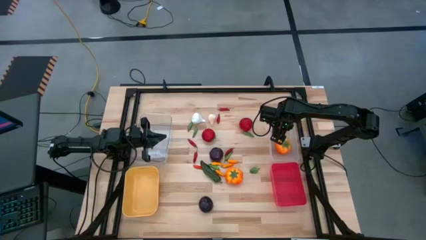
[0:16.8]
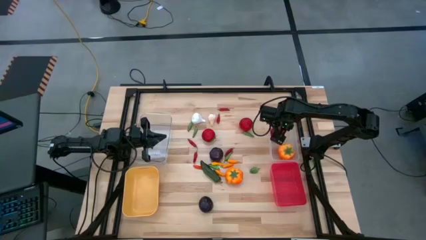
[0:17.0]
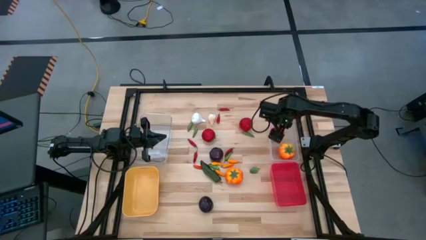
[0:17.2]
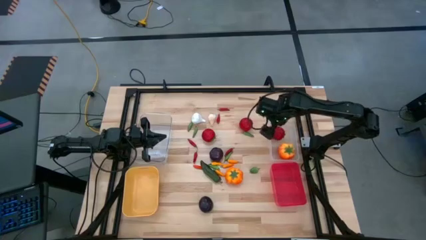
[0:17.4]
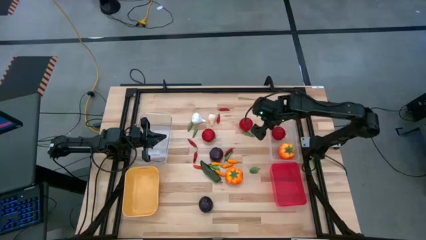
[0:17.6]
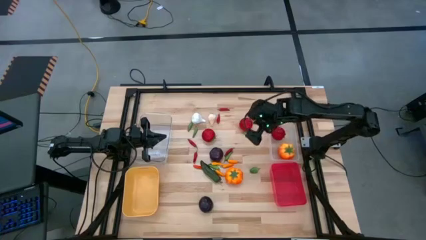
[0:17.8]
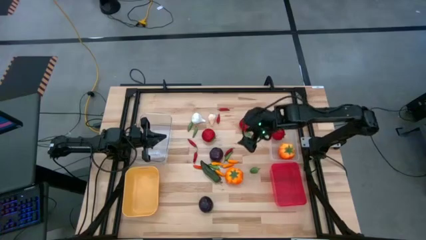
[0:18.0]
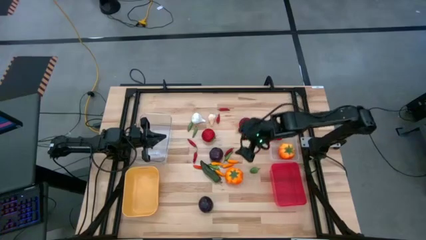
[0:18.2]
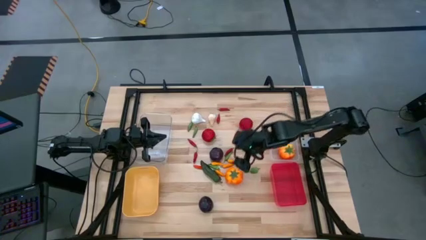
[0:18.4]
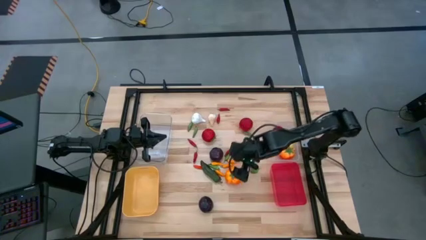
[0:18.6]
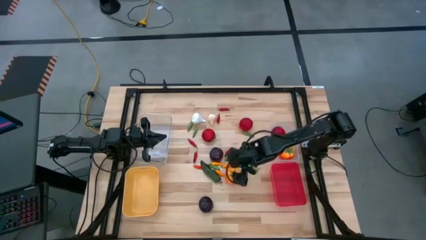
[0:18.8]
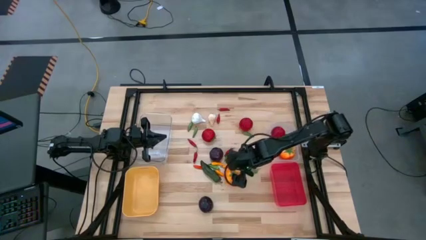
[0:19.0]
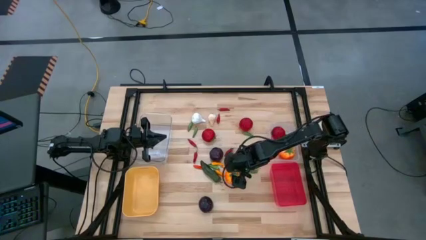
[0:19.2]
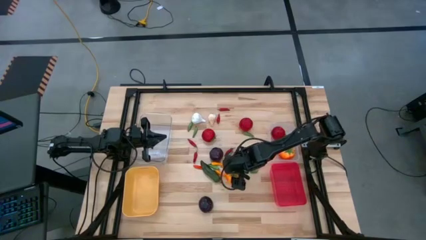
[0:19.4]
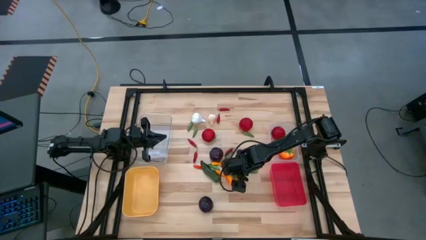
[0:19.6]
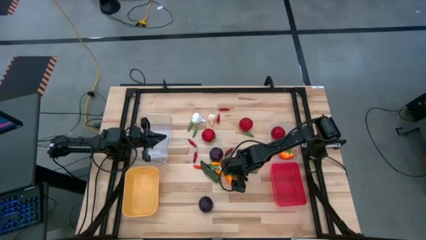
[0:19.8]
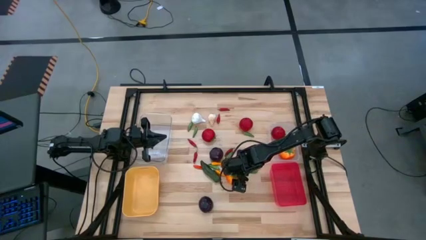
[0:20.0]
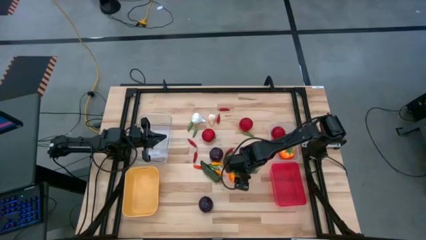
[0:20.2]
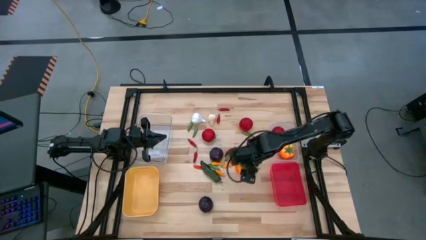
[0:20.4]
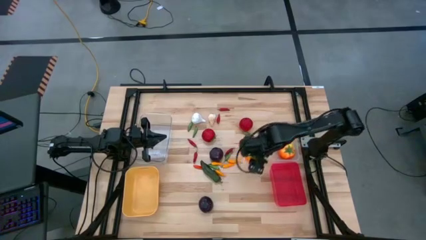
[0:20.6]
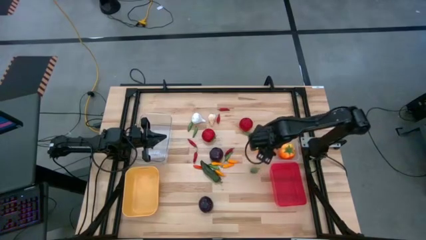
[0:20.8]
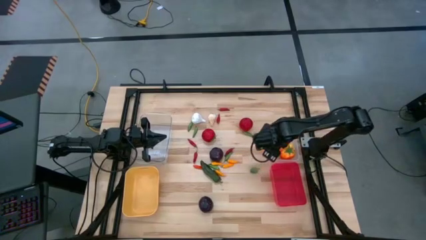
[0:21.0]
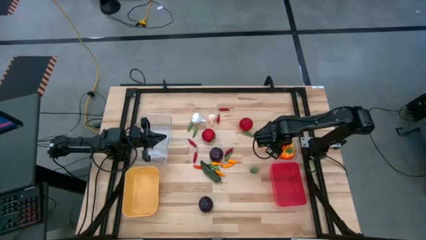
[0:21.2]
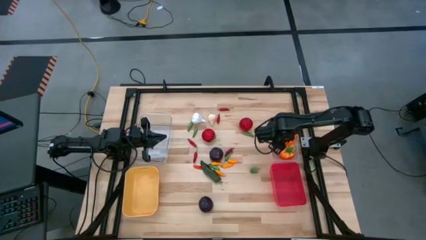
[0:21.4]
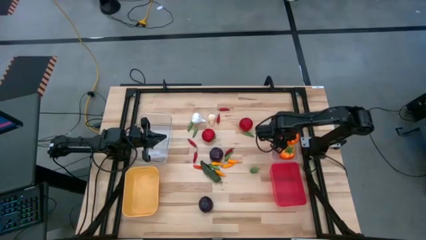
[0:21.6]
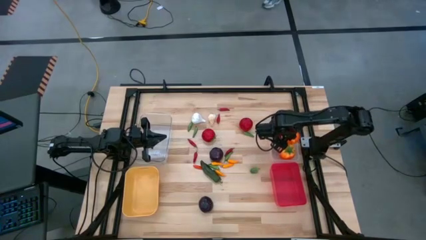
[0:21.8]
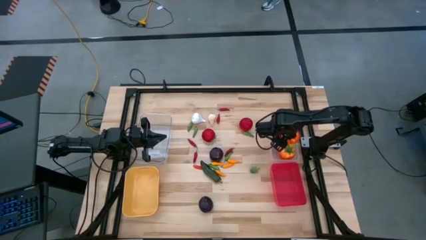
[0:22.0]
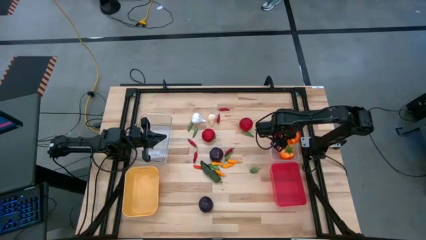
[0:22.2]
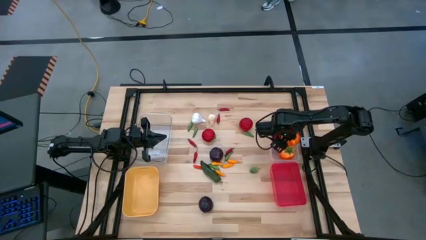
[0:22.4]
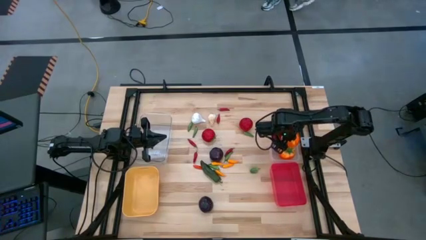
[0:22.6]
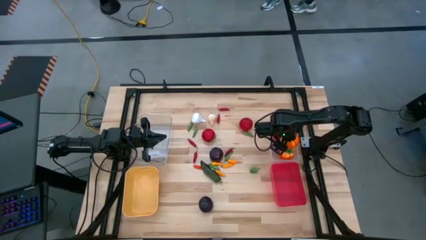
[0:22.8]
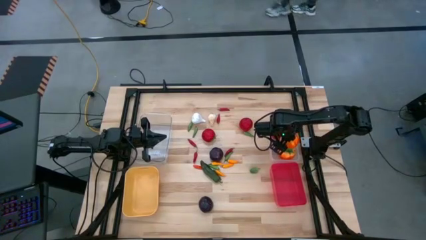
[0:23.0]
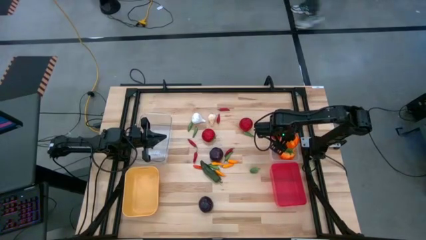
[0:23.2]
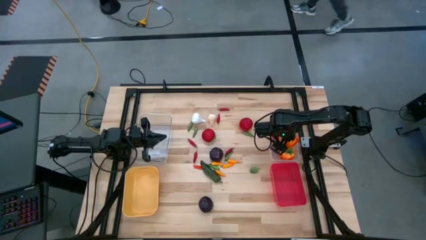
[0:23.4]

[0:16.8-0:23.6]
Task: Sort produce into baskets
Put the orange tomato into the right transparent bin

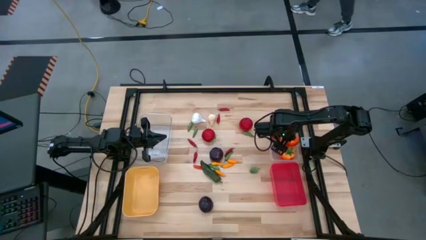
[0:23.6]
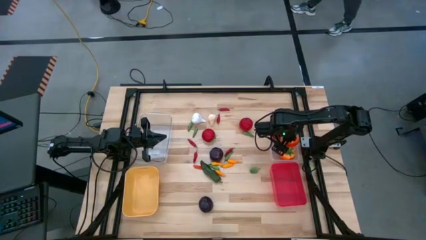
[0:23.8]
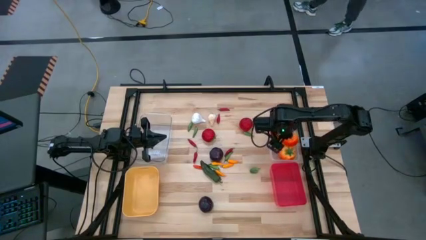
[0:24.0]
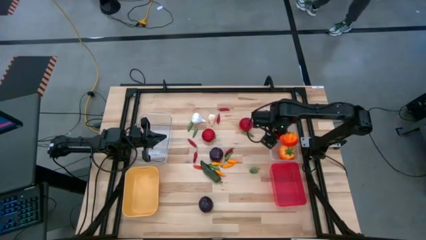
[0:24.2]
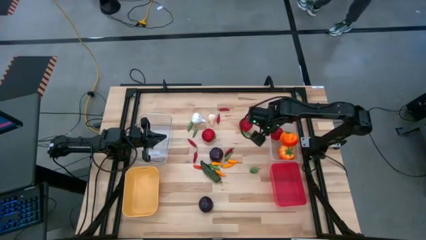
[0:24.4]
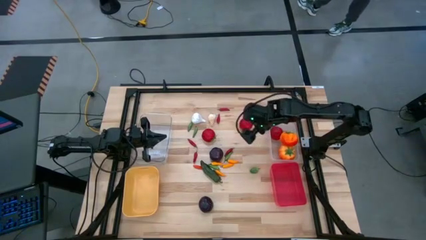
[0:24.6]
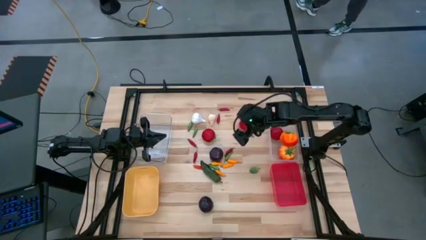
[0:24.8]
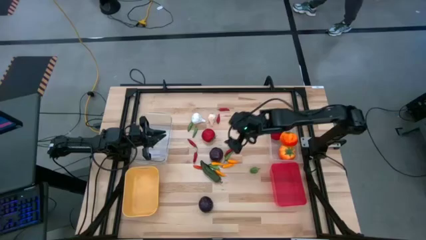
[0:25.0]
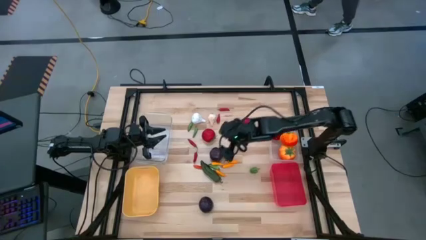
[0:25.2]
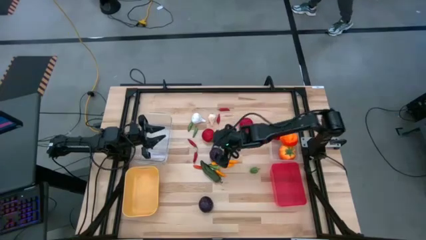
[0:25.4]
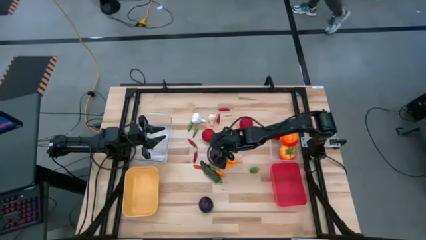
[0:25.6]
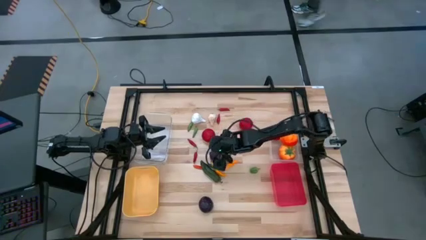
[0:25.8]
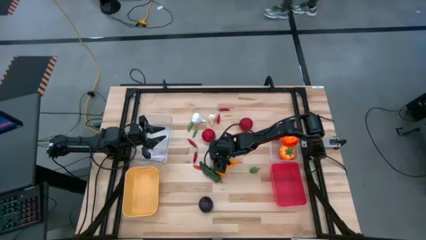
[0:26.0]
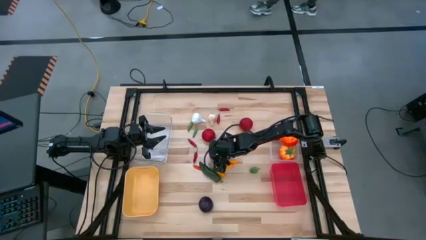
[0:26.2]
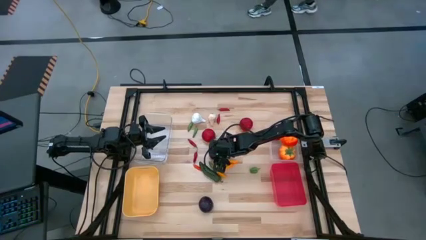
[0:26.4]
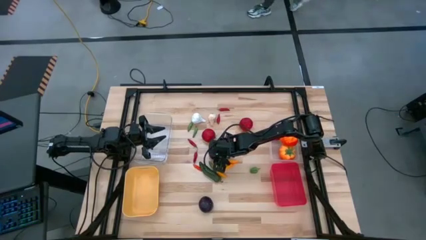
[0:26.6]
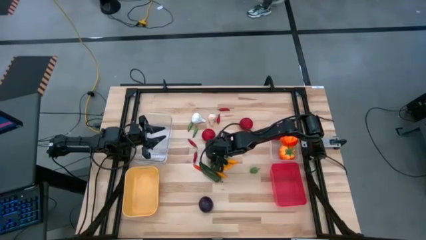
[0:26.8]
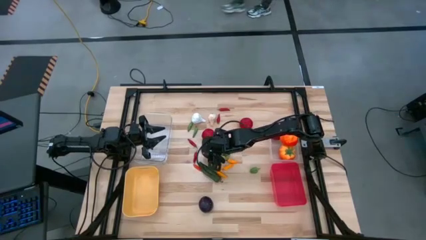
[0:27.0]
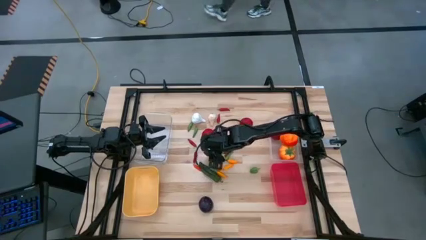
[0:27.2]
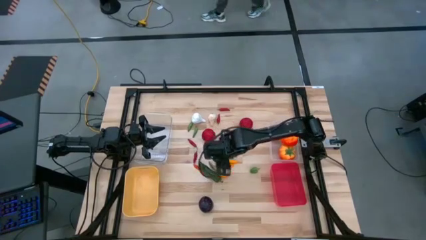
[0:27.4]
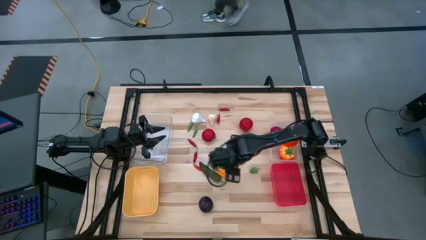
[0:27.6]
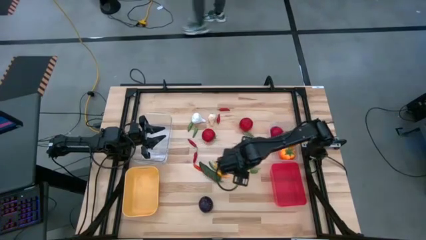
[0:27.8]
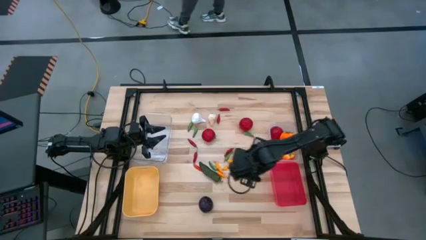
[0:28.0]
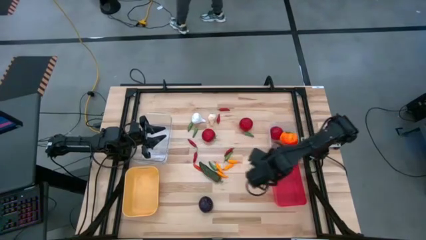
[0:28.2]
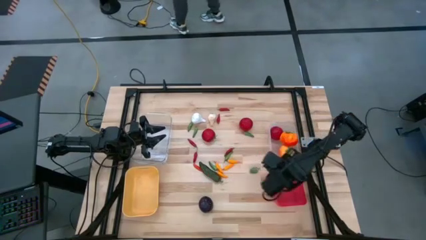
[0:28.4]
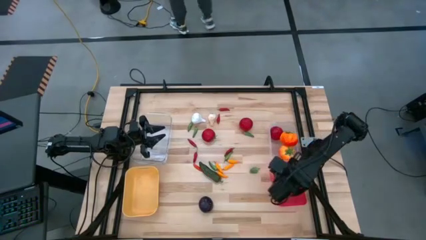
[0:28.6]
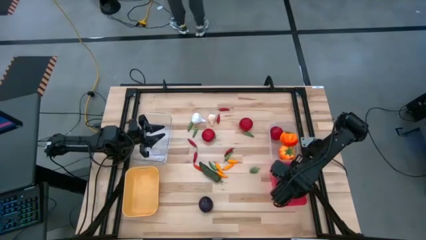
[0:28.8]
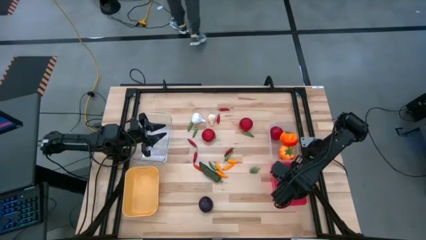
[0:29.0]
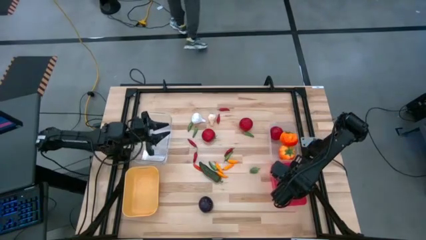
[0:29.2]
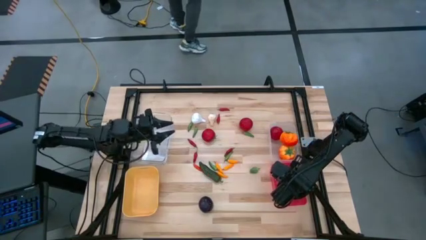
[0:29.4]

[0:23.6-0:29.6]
Put the plum into the pink bin

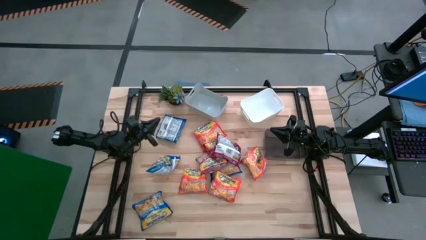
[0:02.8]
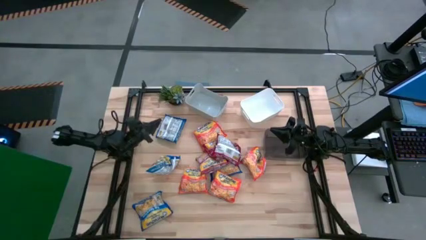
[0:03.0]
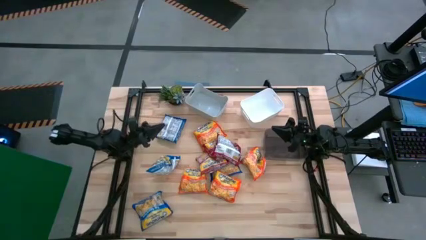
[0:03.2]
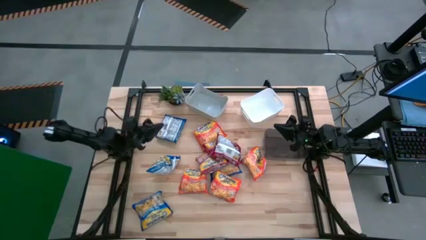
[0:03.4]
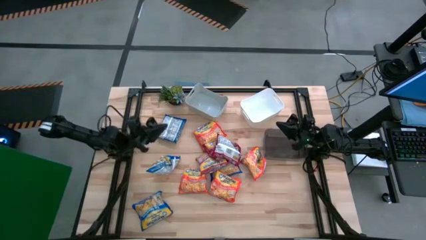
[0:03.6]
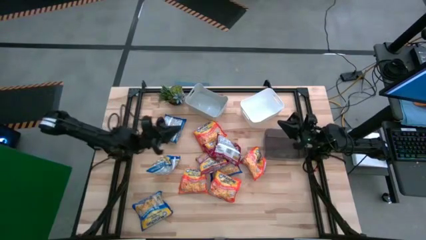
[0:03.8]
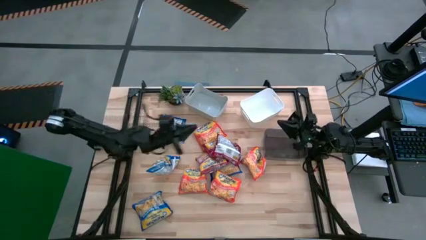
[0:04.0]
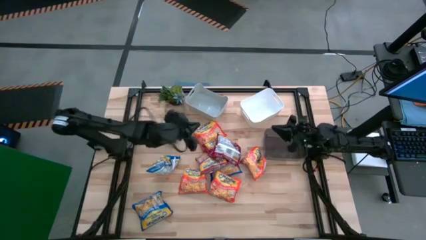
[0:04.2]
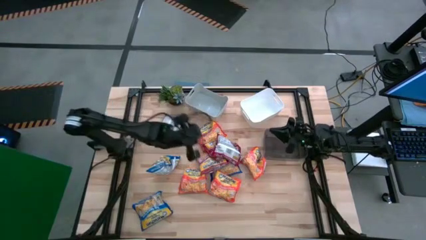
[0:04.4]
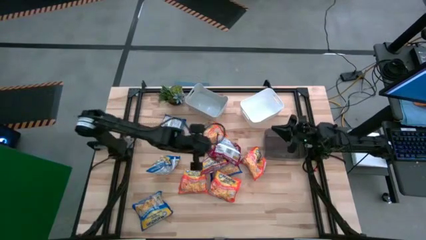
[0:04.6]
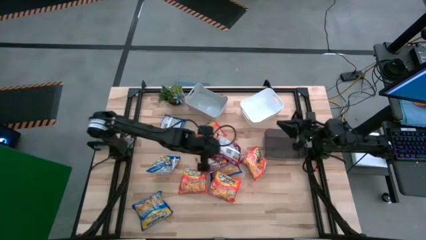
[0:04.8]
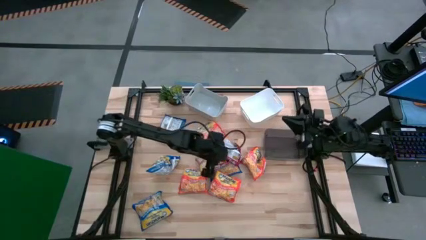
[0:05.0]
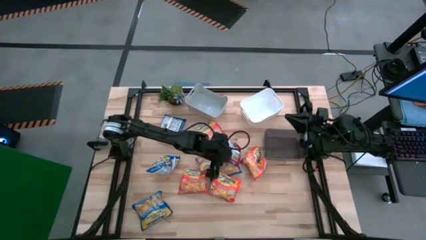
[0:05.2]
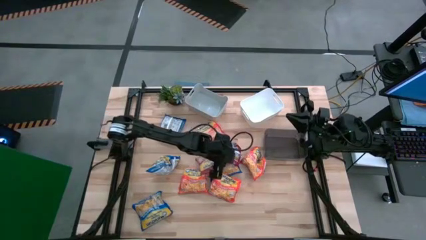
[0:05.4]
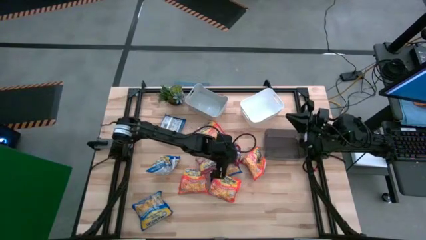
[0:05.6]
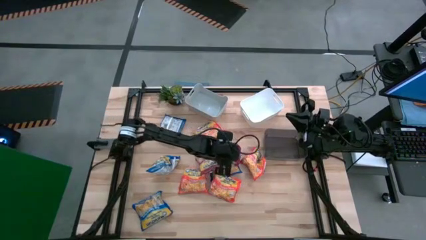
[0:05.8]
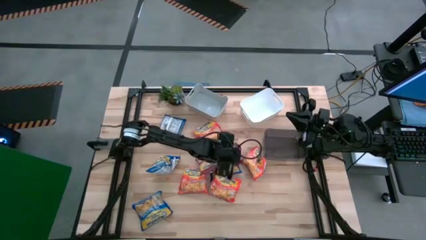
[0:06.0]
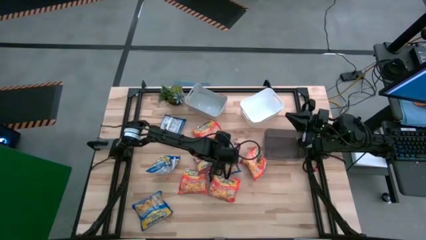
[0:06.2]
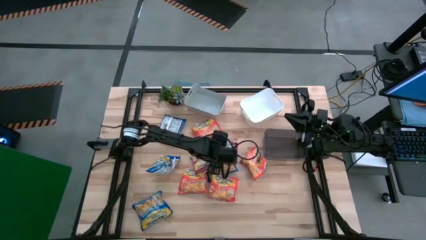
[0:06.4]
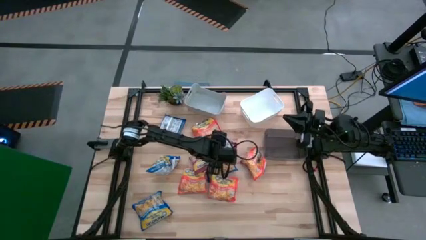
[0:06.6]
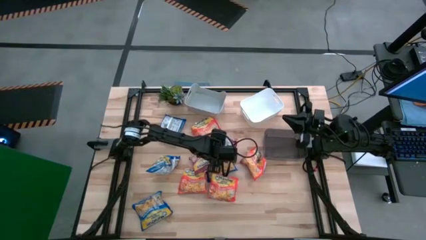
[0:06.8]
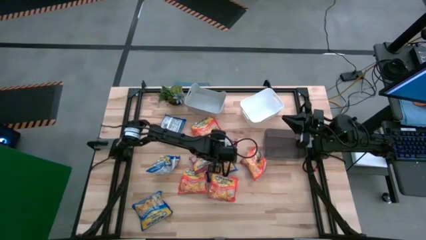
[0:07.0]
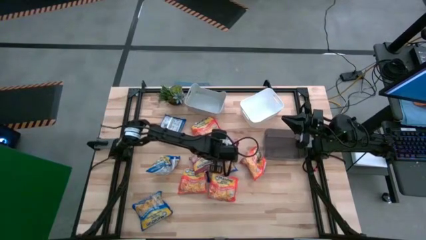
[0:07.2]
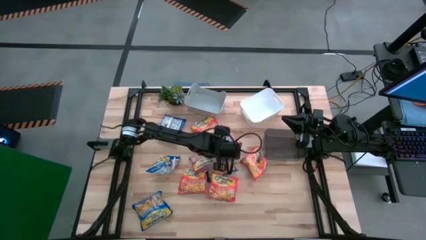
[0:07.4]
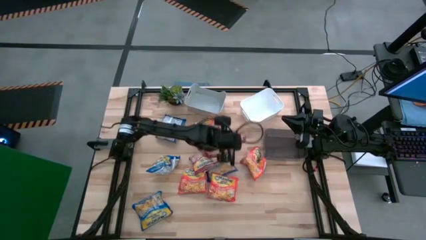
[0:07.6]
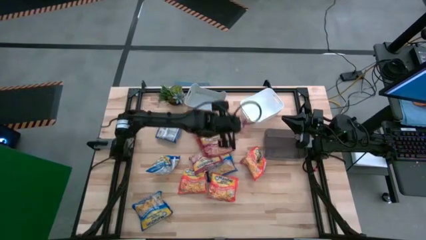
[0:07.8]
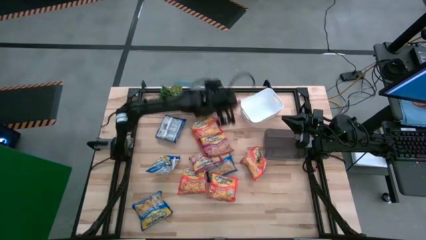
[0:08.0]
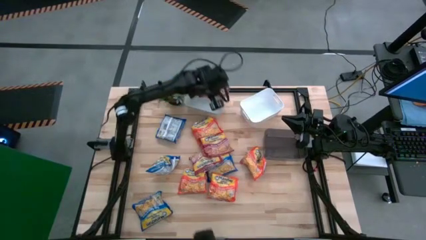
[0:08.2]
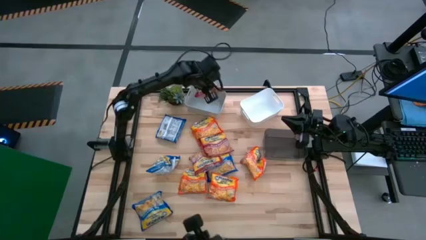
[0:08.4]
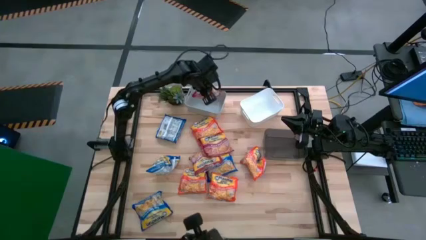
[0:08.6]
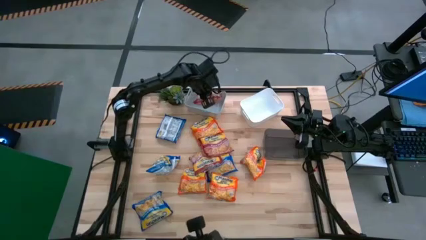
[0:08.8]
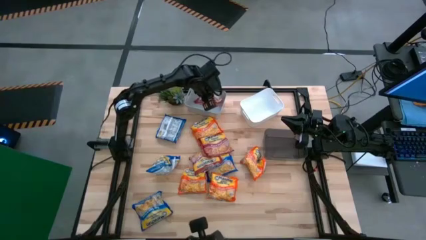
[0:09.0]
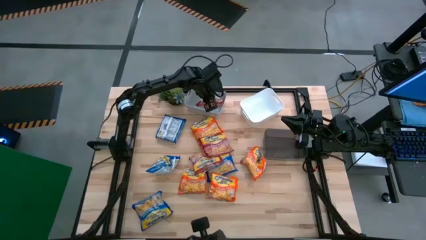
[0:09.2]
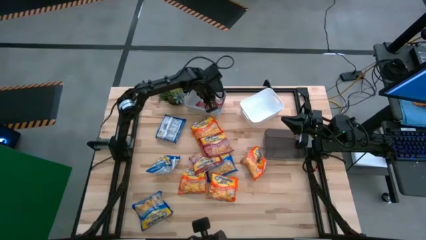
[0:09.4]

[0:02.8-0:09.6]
Task: Sort Maruchan noodles
Put the red noodle pack into the gray bin
